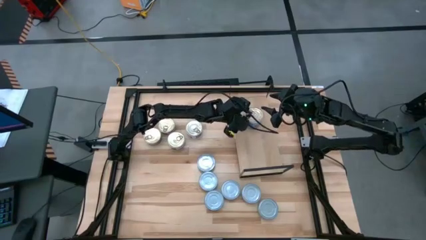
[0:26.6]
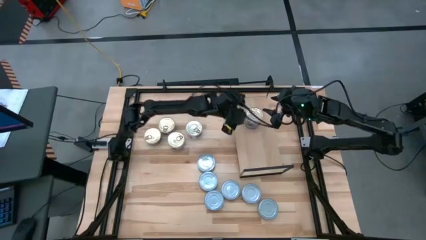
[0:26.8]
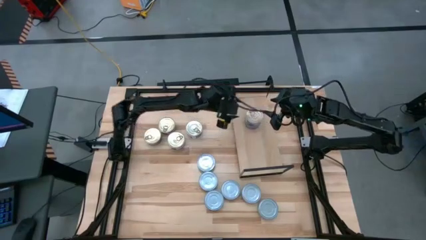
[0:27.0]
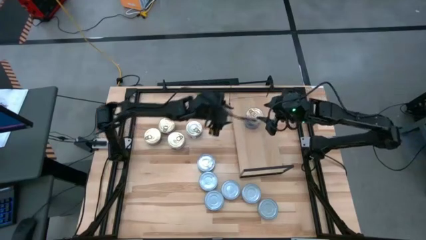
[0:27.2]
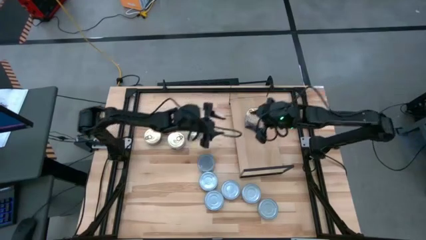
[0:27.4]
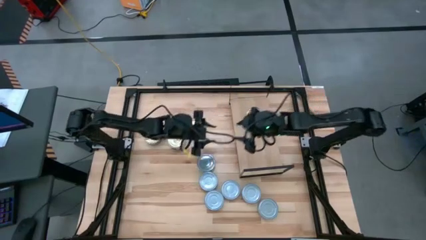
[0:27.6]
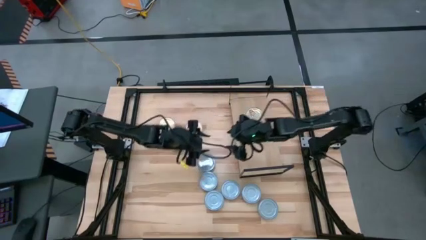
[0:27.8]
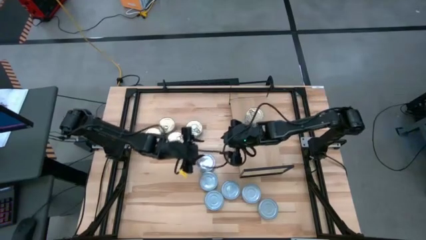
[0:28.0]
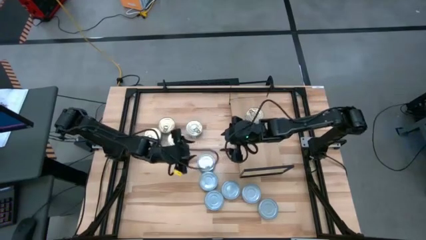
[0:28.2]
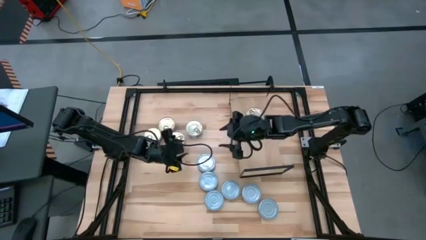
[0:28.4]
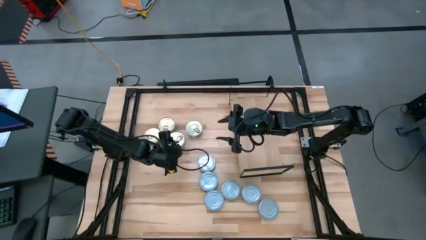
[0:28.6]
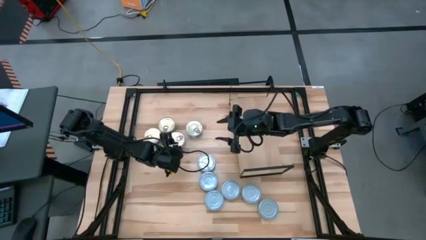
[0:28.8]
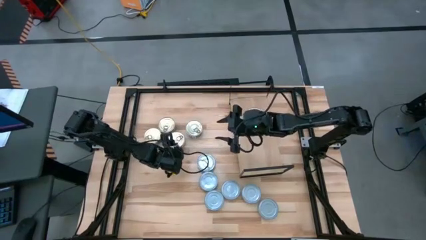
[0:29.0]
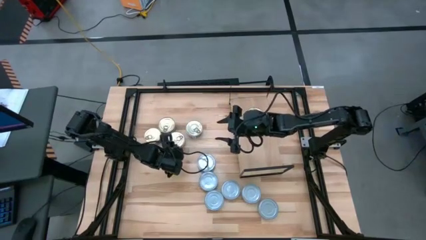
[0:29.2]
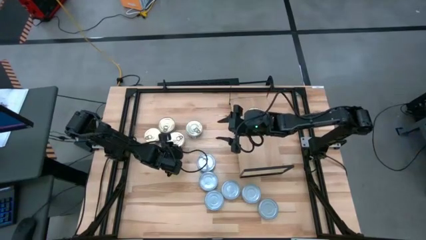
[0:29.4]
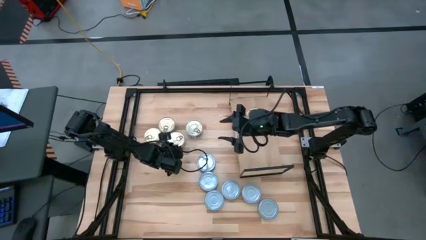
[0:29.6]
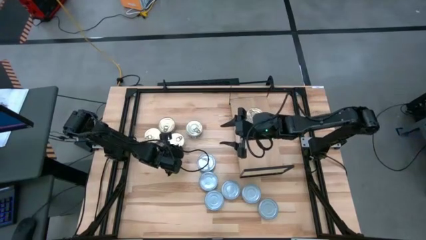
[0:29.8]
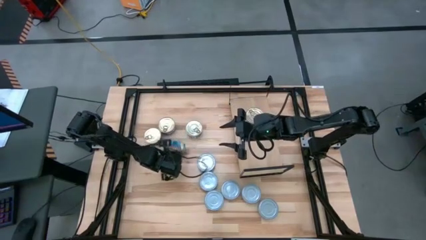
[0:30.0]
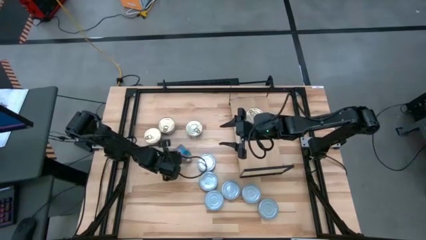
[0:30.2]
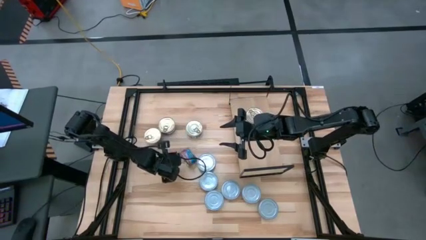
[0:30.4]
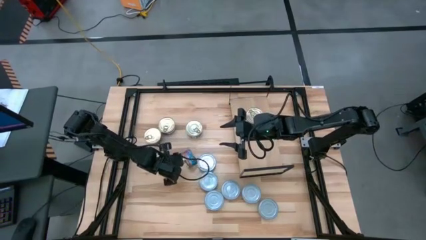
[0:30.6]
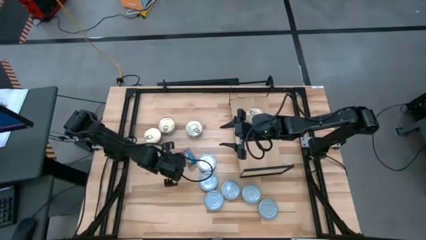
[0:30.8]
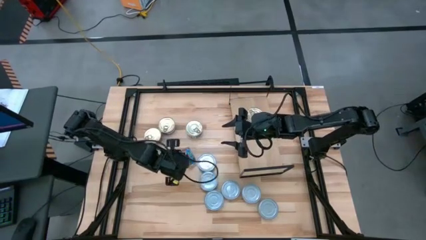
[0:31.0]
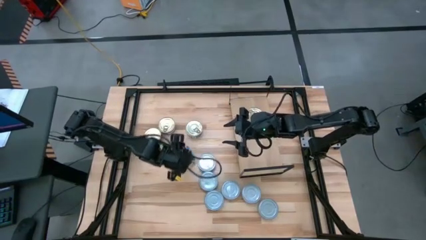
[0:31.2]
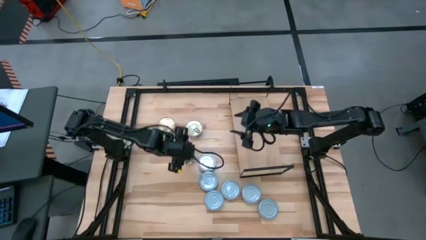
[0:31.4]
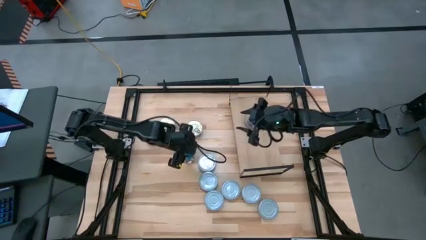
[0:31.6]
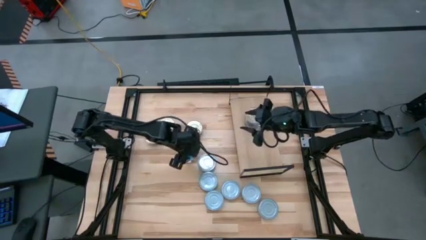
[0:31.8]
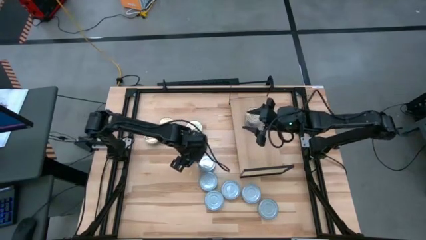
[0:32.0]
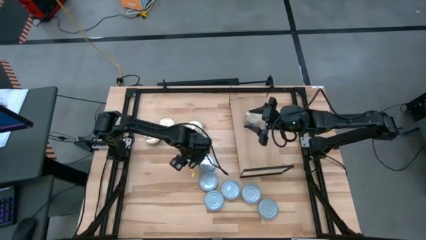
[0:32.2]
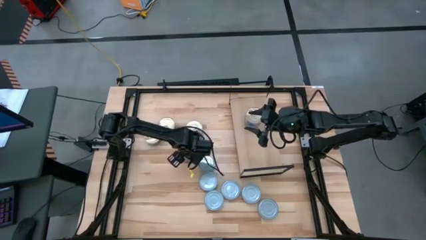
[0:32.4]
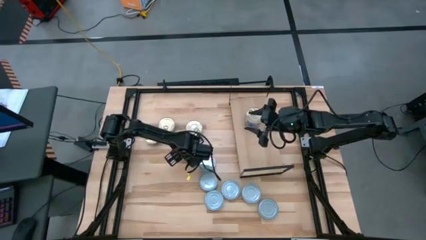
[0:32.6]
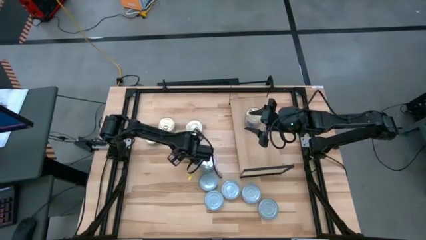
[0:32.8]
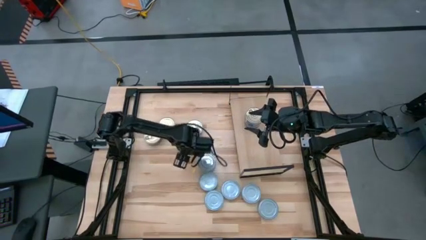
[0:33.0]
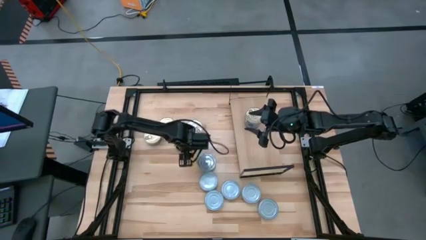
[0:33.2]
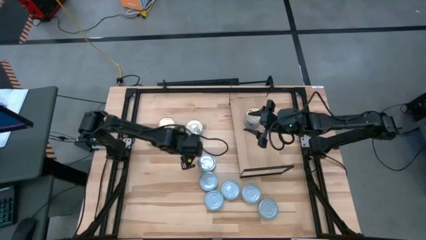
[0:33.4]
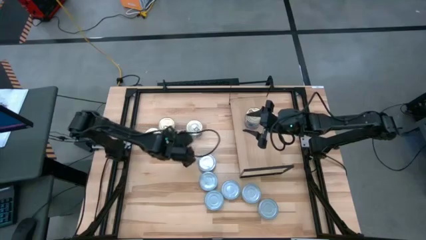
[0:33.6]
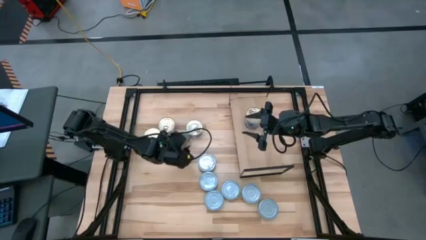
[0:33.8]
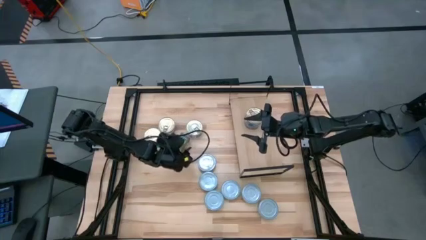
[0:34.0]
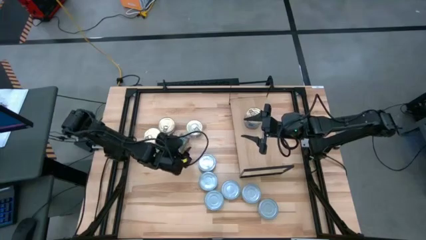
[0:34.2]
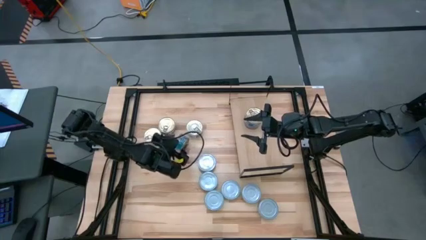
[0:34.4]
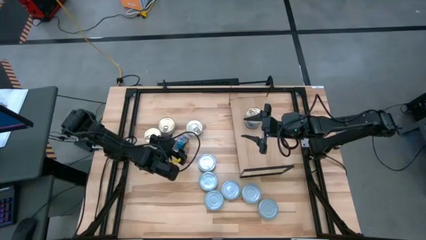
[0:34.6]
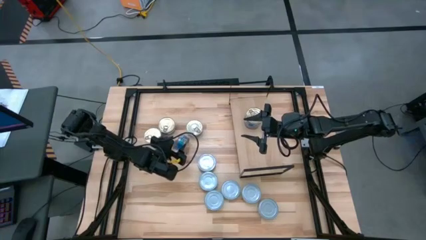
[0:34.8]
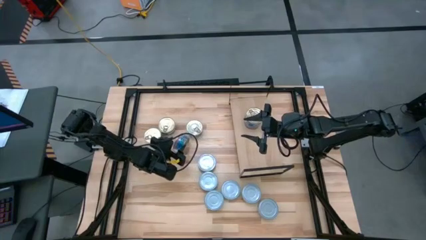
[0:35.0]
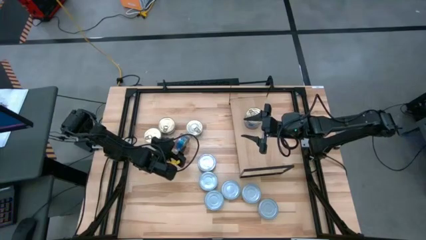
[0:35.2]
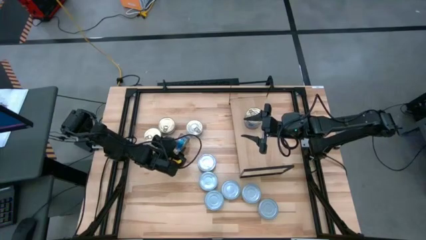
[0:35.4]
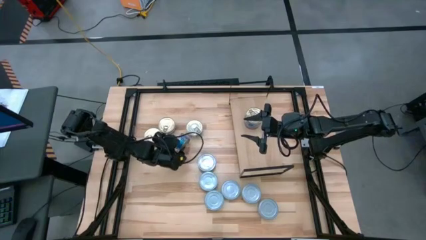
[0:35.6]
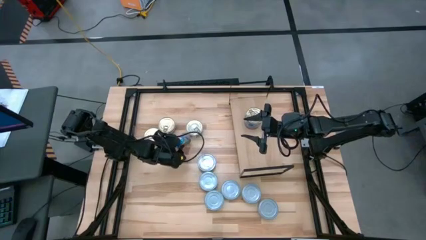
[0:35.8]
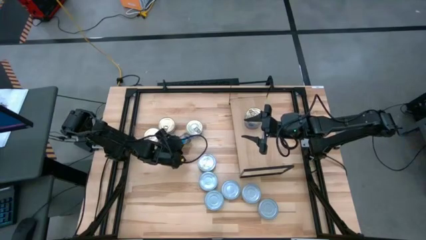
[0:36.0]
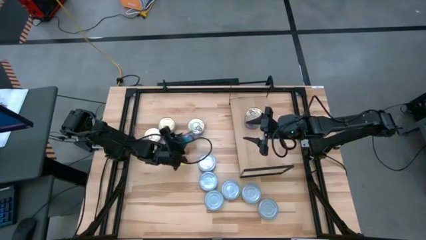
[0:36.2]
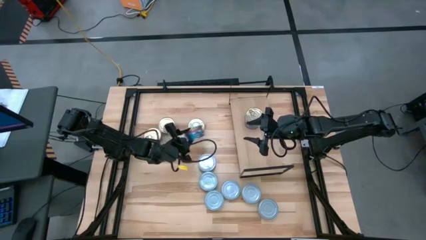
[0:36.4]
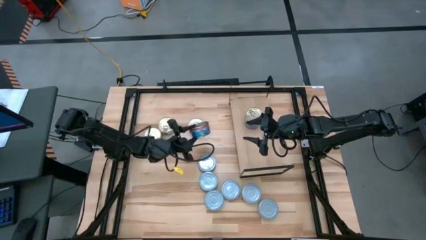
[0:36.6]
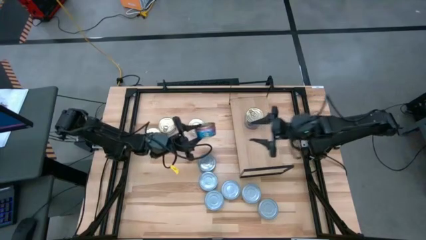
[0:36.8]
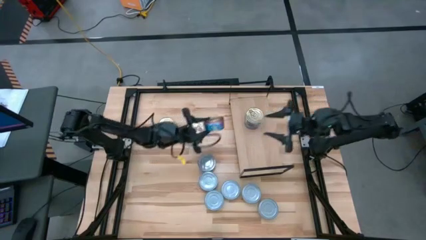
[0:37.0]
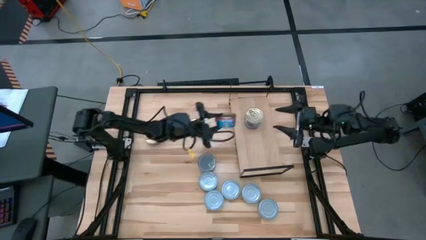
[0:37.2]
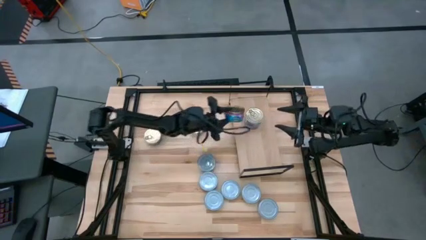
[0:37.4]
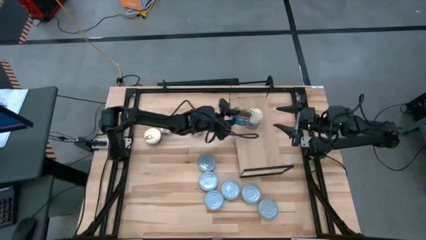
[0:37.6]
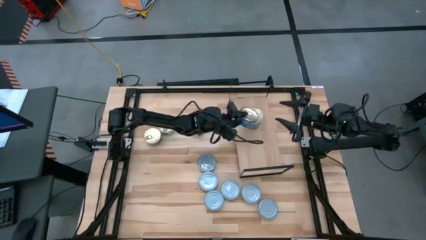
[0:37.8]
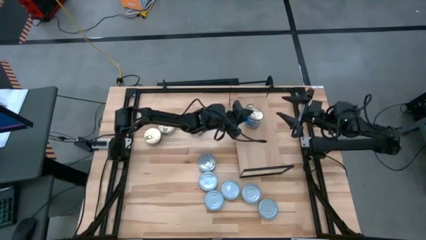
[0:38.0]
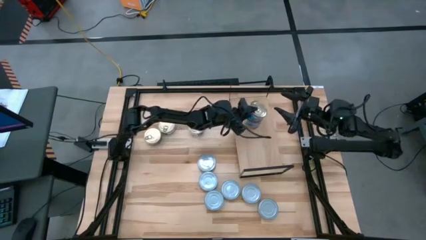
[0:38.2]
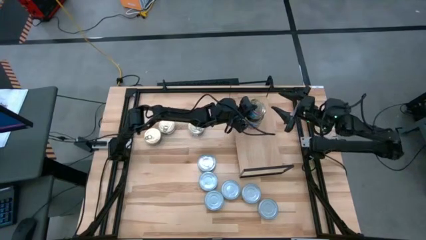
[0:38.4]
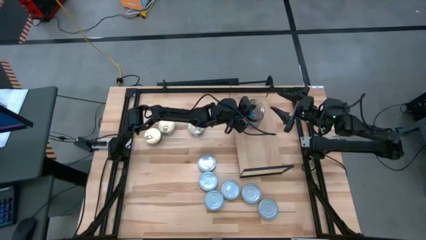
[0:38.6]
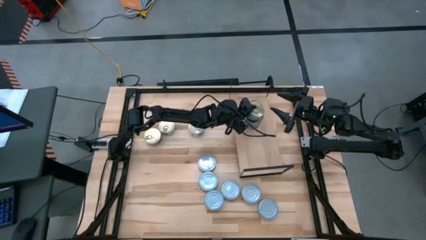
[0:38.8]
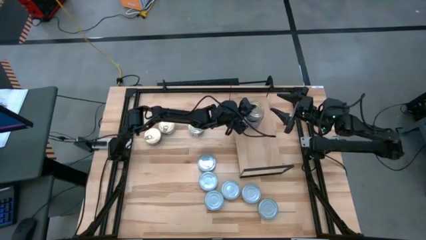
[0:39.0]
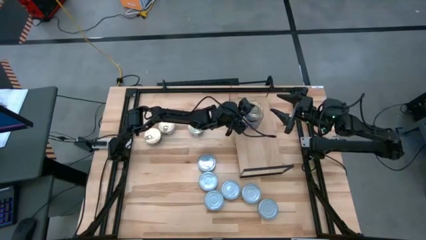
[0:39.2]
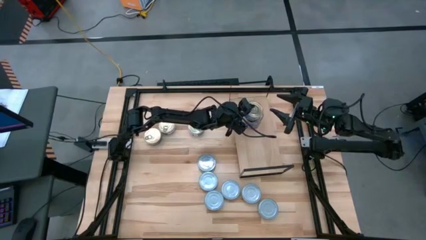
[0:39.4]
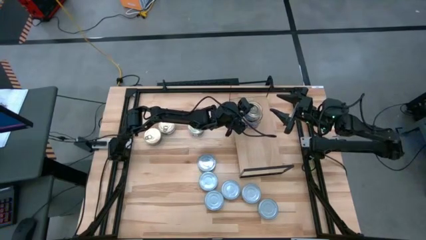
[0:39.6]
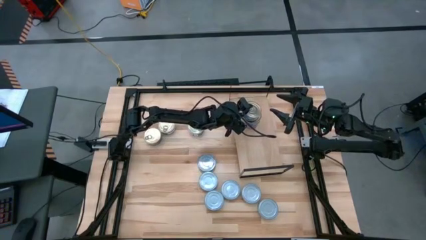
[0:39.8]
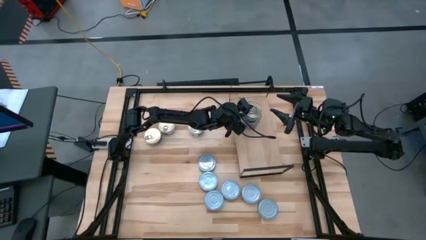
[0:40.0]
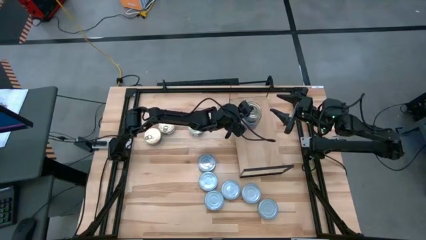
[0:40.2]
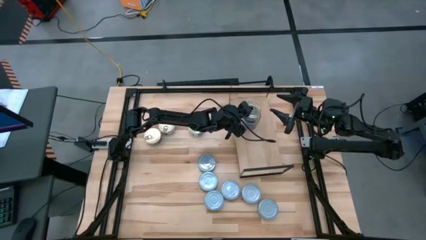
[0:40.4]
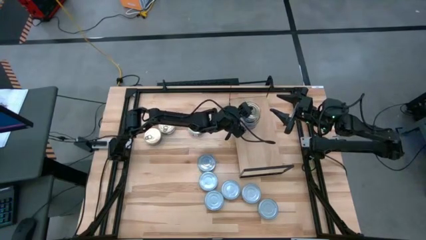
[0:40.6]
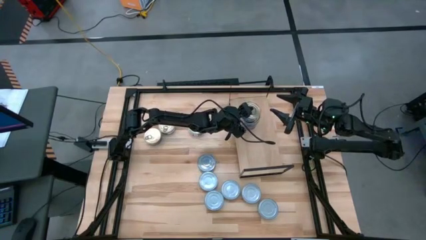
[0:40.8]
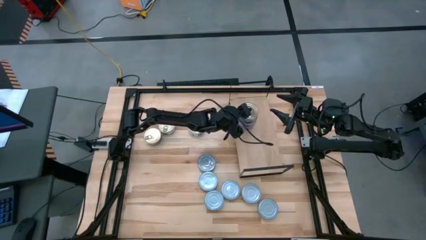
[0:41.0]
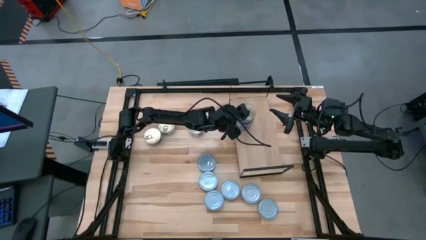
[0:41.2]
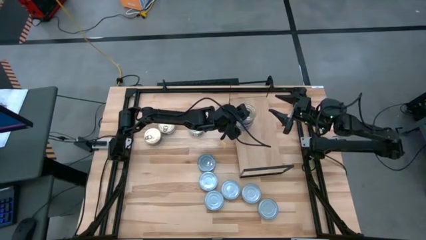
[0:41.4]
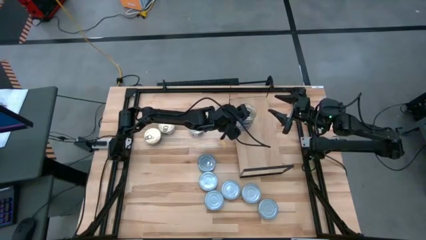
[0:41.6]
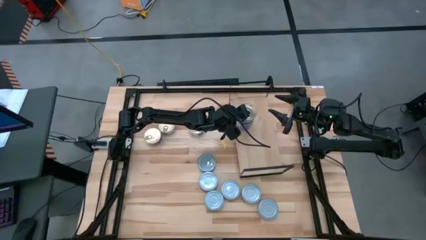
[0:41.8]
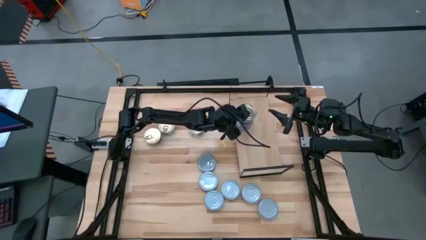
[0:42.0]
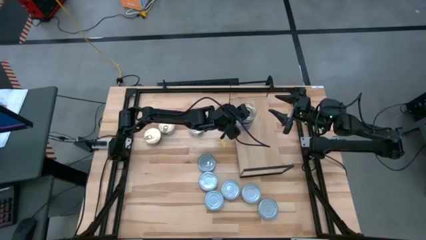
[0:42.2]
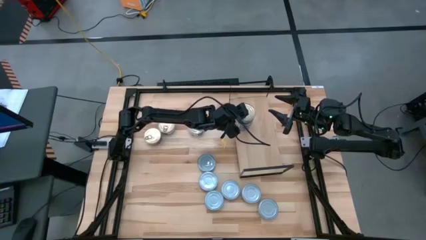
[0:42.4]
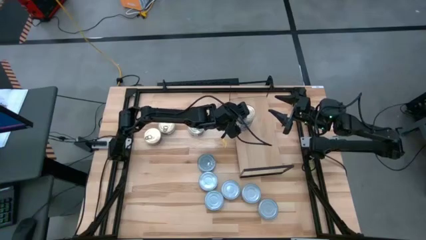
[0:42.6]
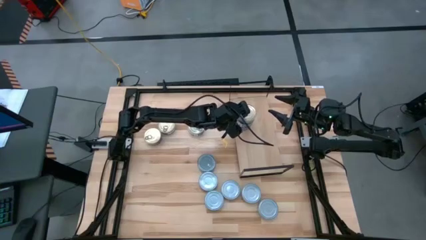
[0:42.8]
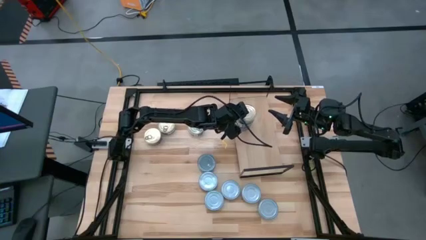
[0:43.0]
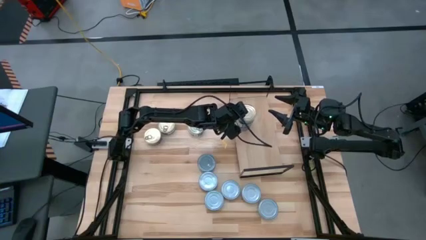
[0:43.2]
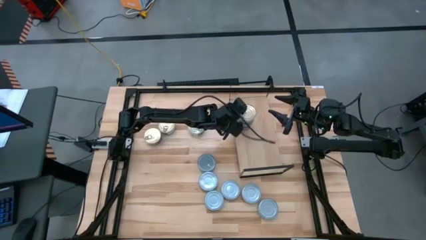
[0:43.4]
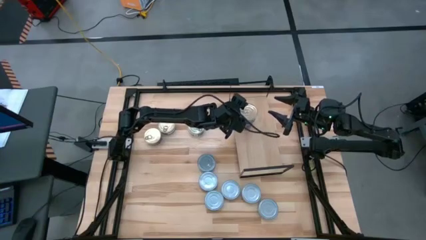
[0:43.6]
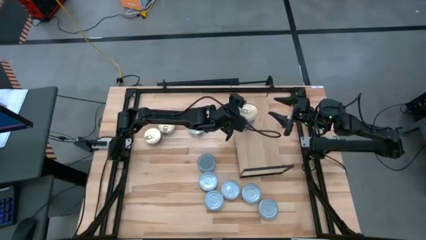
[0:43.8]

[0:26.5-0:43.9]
Task: Stack canned seafood by type on shelf
Stack the blue-pink tuna can on top of the other blue-pink tuna can on the shelf
